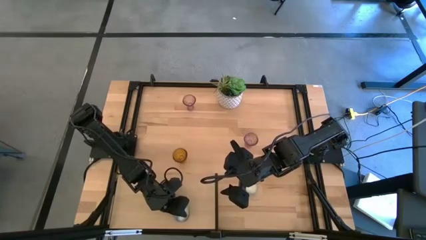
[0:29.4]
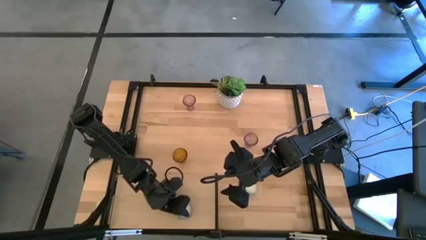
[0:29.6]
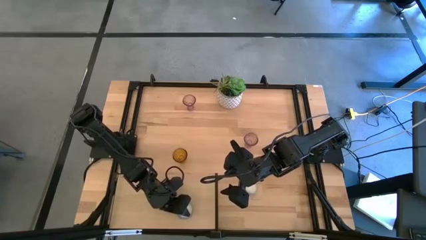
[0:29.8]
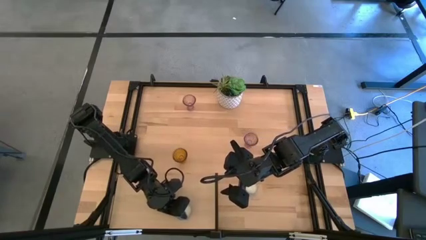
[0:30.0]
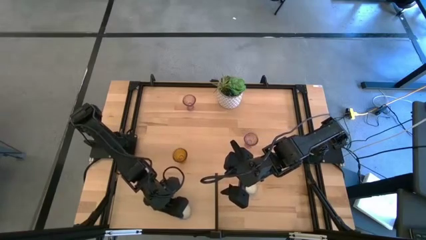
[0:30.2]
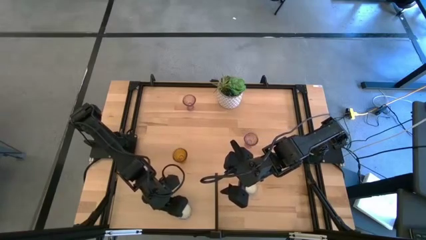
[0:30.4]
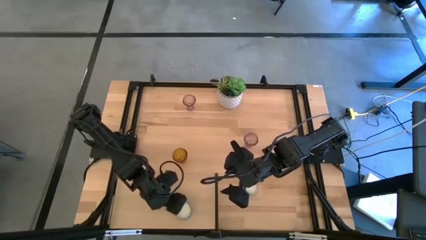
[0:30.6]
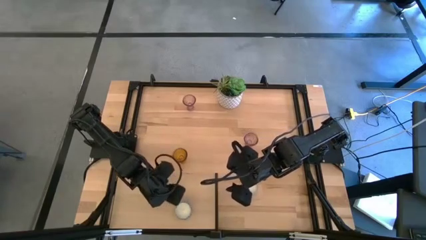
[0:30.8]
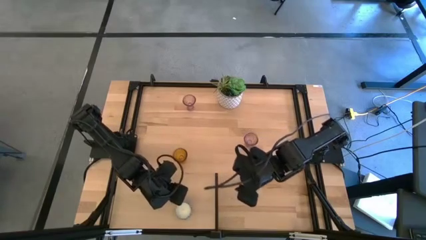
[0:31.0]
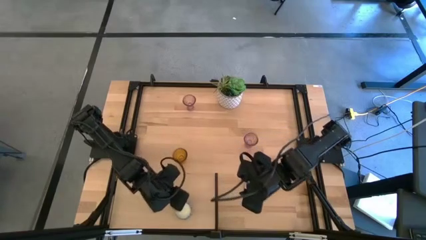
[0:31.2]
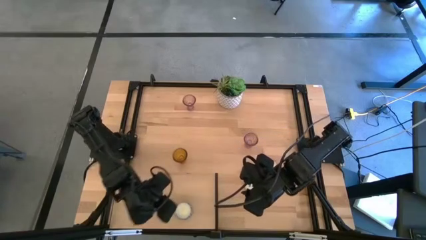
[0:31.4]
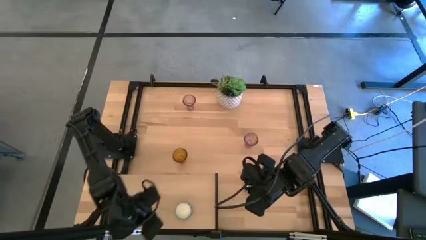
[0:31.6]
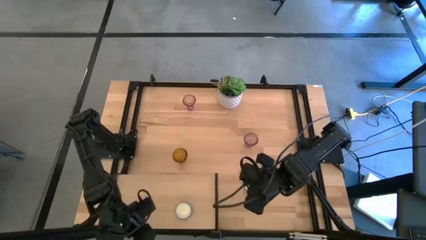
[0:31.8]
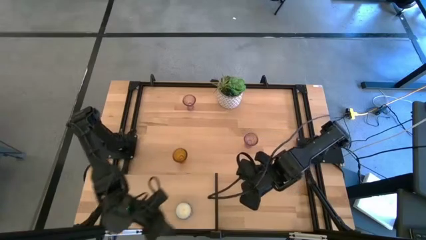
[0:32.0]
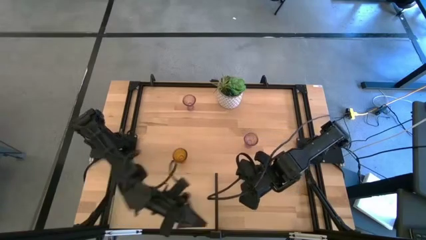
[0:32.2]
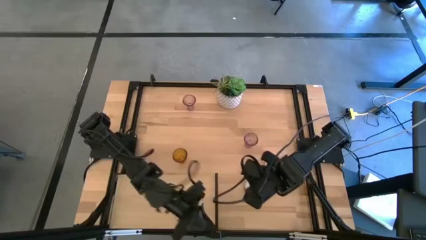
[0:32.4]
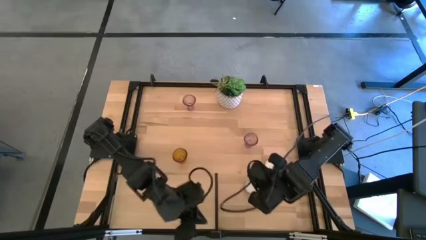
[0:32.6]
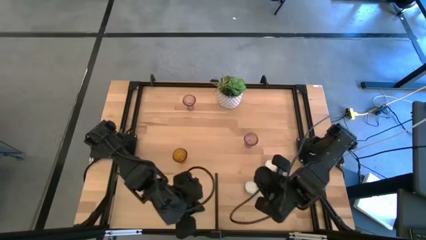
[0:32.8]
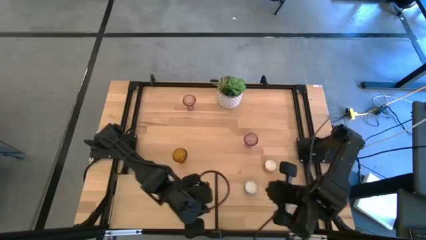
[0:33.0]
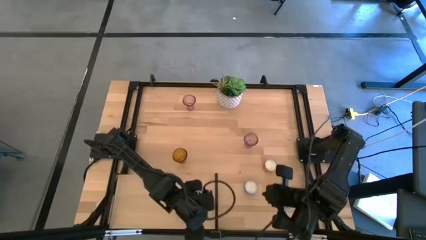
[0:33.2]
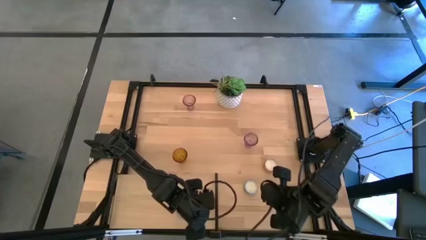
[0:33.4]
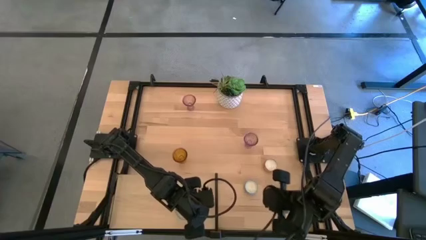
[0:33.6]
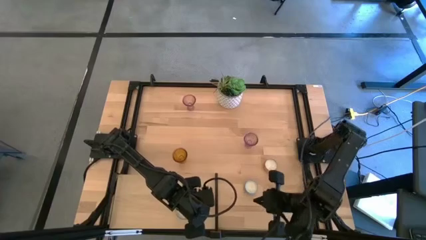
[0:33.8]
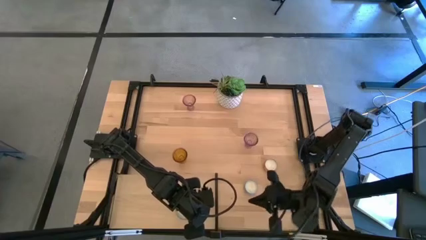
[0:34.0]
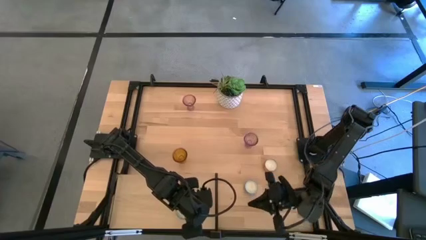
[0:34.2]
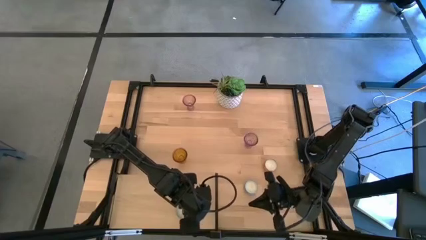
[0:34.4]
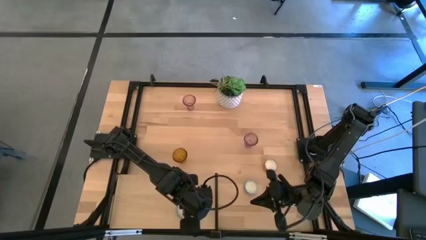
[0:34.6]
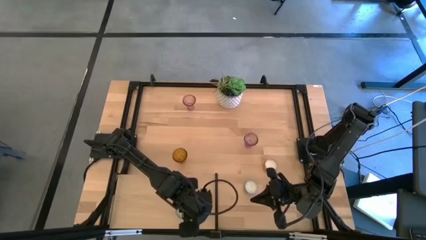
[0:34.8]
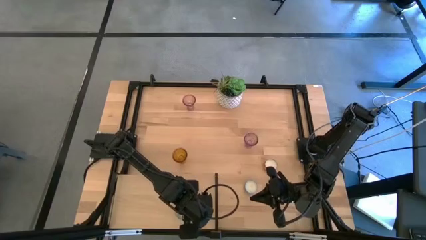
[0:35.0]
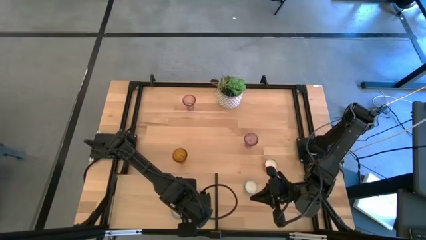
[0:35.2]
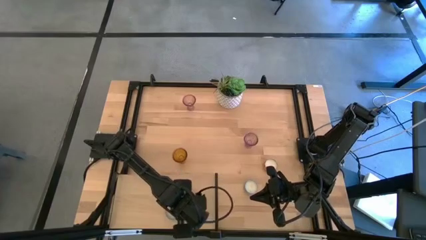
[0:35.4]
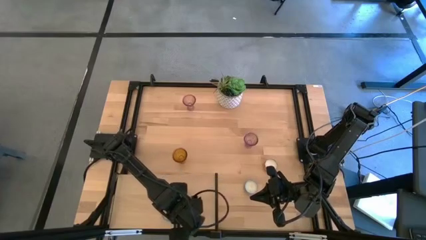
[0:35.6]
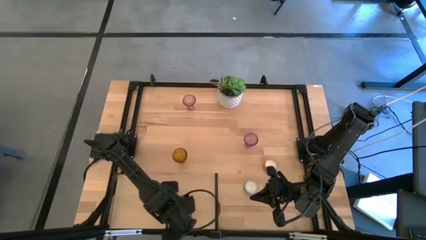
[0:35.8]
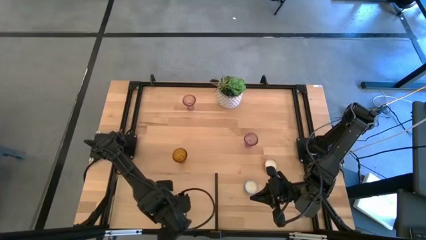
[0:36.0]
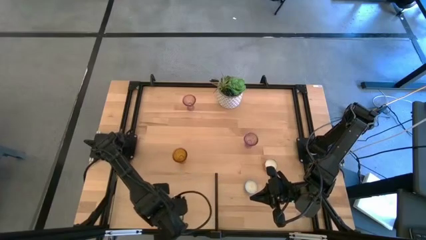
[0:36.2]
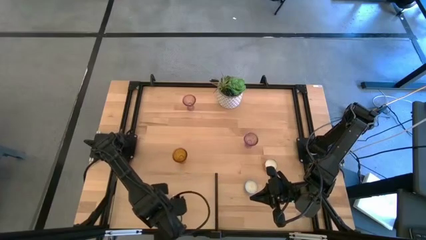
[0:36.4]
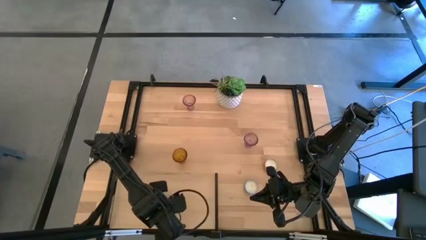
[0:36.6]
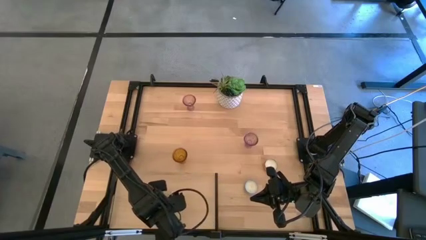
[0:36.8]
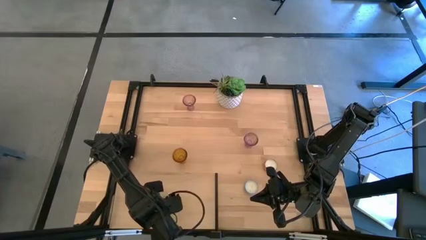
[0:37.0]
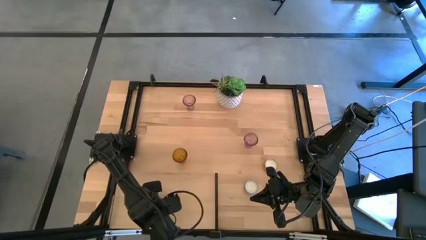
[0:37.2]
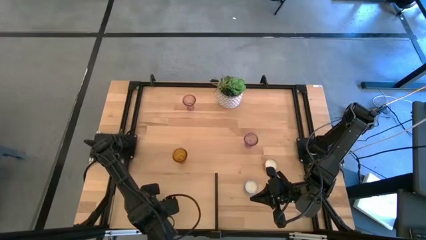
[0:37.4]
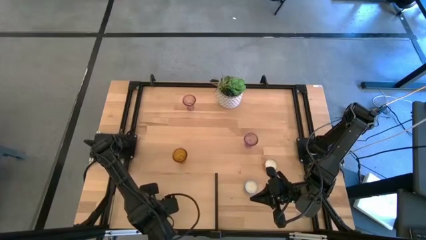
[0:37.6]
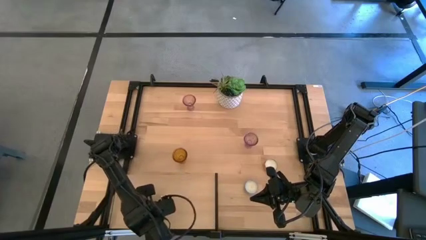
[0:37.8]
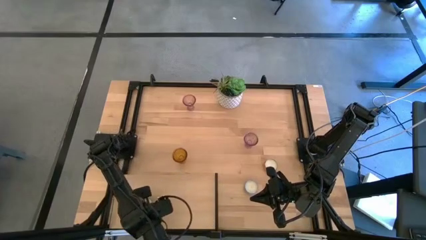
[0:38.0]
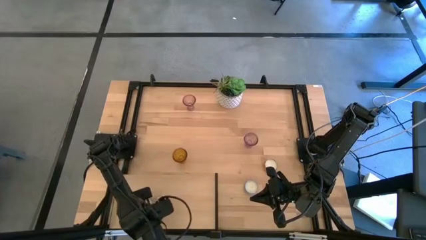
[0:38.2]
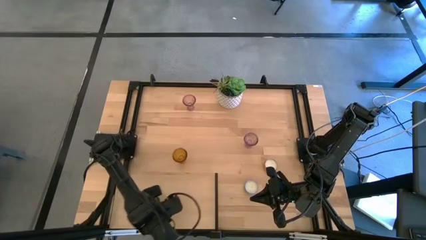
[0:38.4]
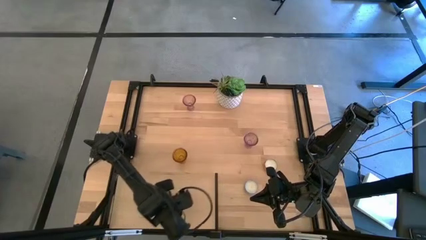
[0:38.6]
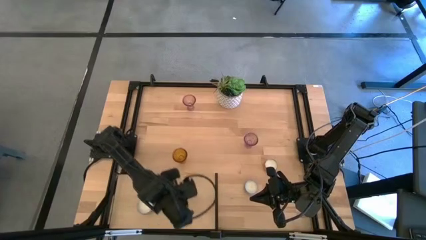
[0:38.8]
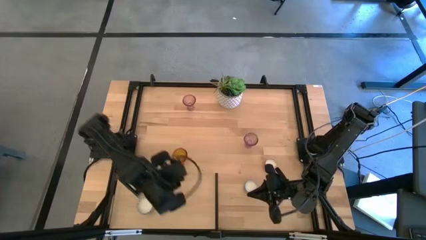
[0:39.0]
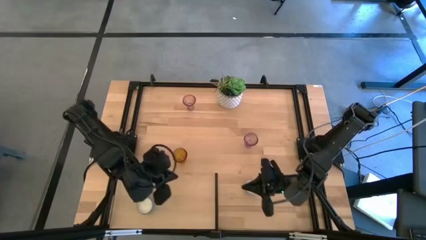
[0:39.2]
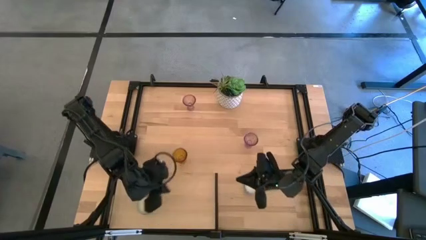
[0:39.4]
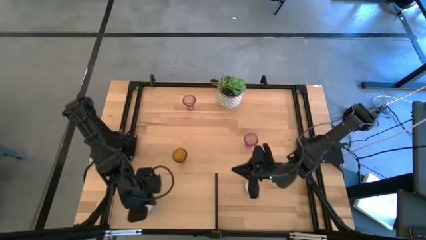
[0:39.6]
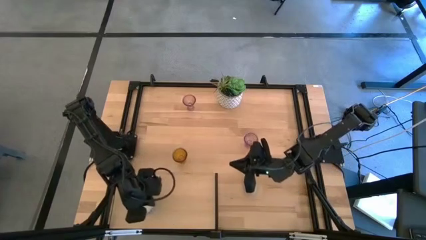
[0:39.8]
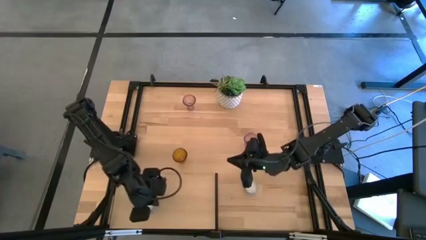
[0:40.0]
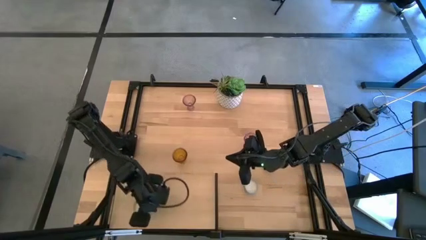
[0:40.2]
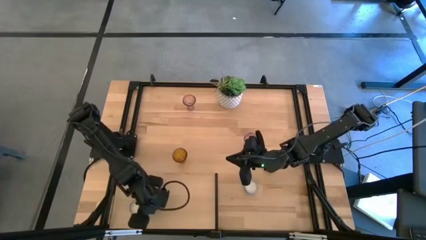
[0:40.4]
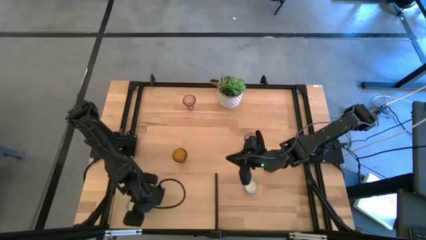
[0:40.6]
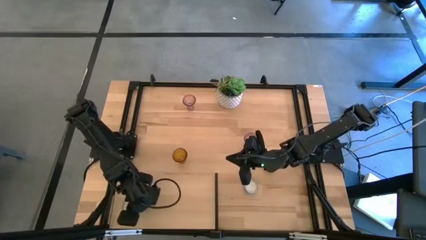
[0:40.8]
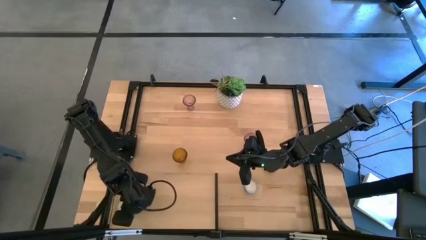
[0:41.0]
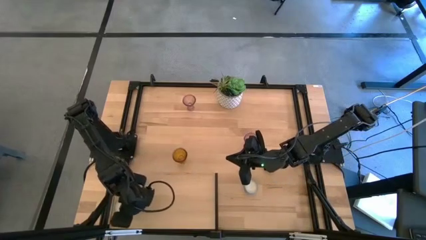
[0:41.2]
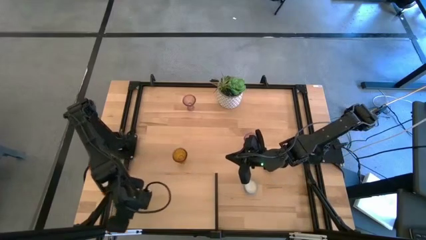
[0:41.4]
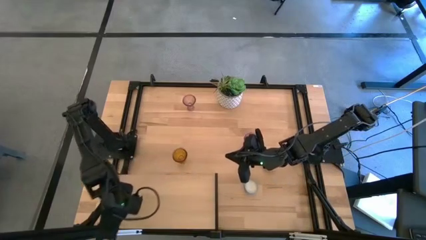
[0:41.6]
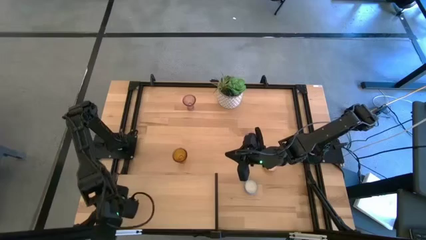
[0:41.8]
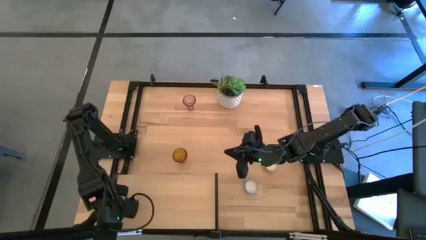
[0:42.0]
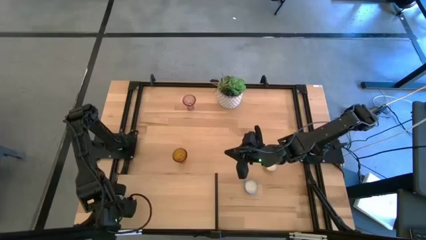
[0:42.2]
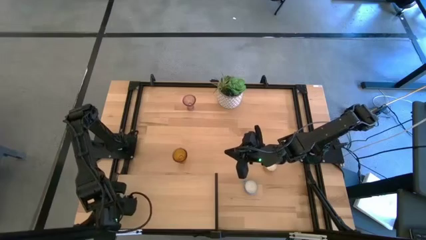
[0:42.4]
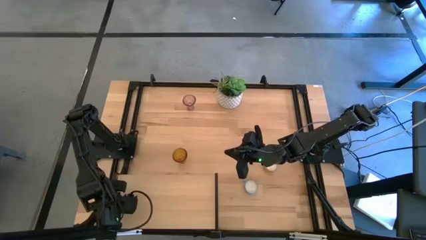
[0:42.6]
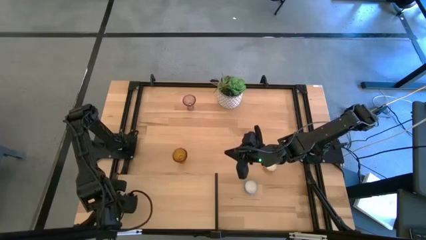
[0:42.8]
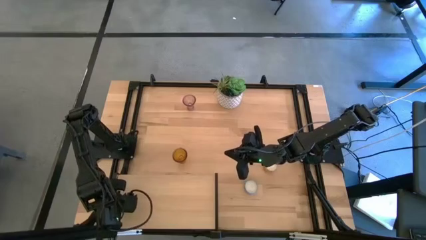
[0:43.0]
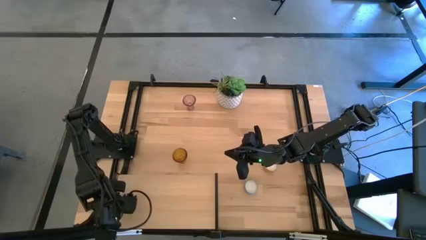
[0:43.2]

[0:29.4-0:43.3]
Task: Pick & Place candle stick holders
Put the top blue scented candle on the shelf

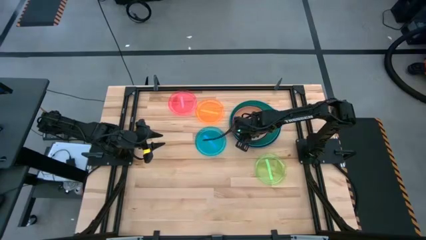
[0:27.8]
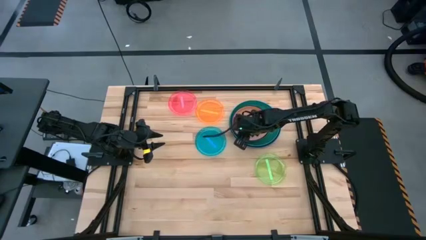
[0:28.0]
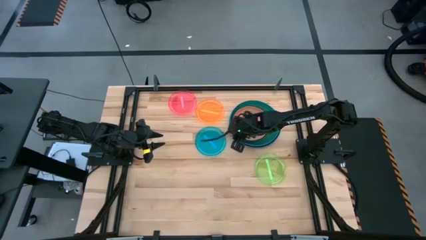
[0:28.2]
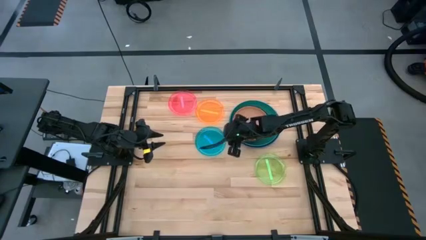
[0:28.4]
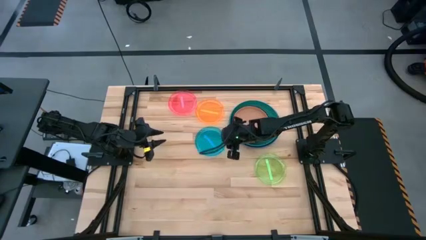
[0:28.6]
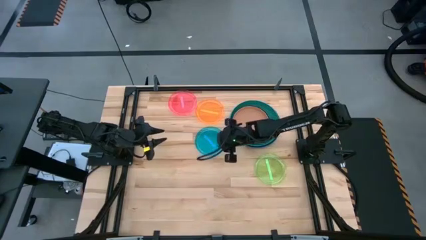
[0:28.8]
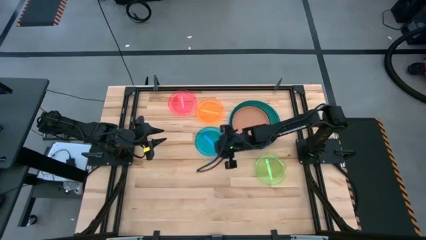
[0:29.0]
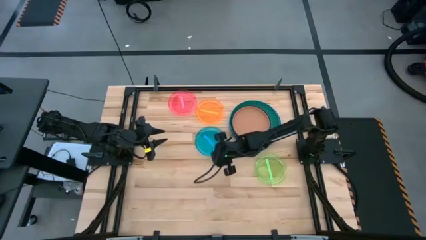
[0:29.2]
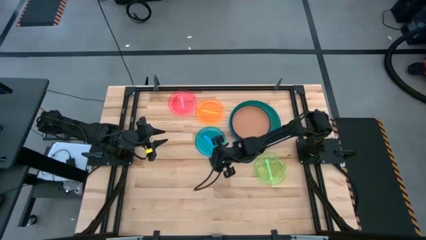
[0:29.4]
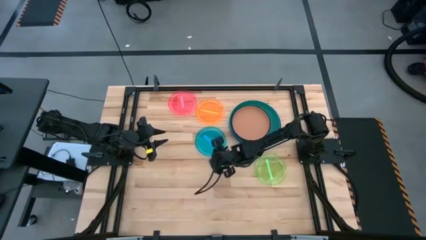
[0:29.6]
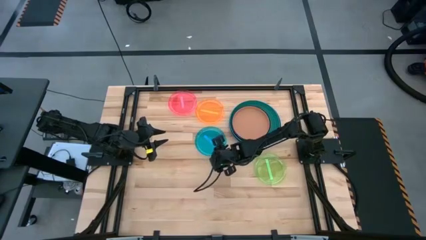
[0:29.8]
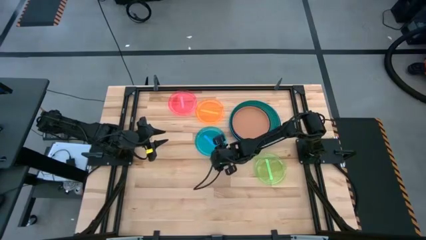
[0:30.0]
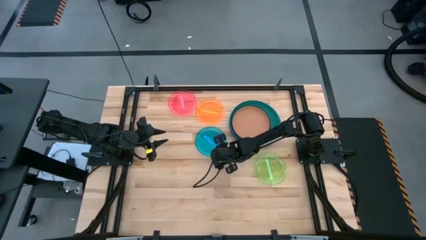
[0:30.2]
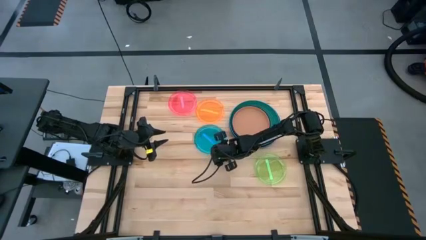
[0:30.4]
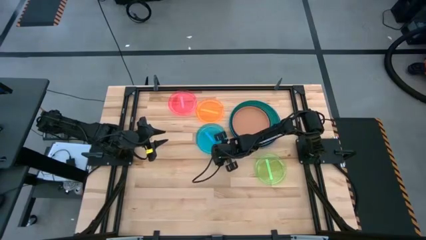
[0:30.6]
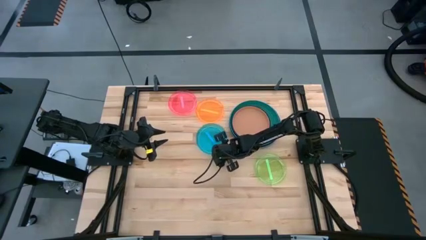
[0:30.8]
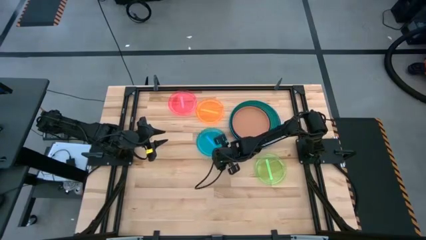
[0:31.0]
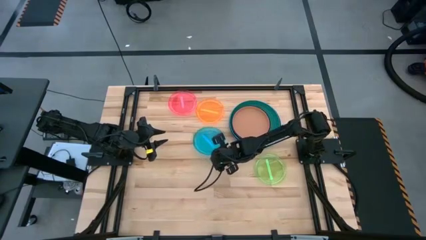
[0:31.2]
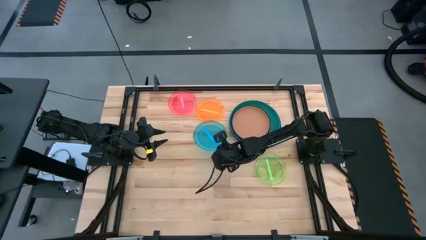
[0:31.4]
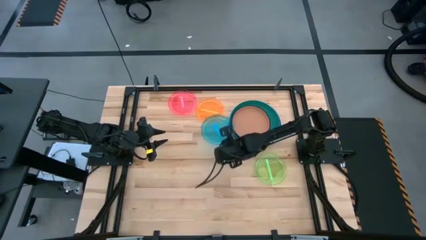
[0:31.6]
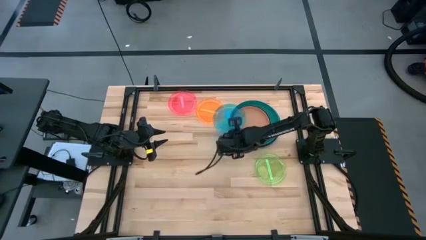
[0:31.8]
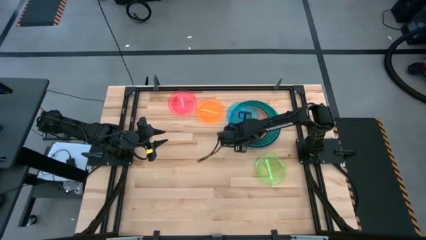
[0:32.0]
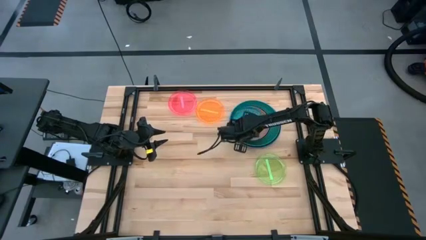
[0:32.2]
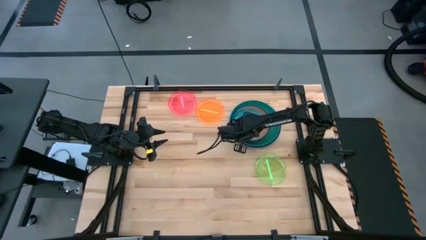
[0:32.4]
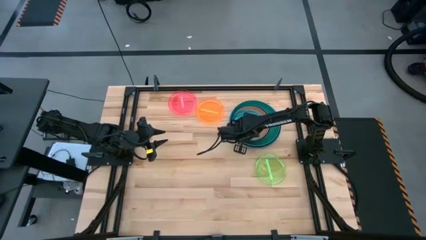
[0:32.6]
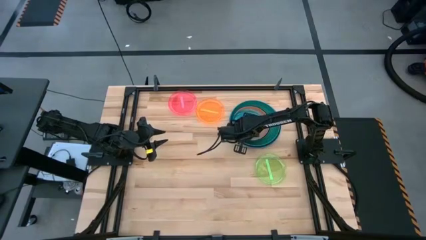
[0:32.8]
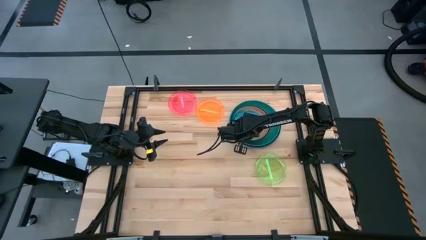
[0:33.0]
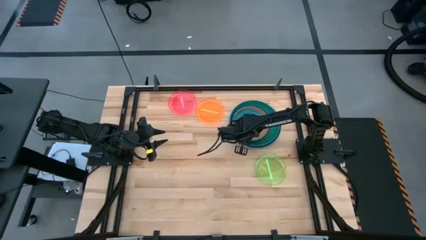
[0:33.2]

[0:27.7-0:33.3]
Task: Stack plastic plates
Stack the light blue plate on the brown plate
